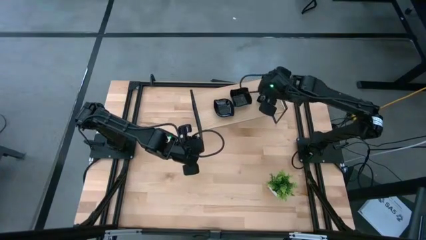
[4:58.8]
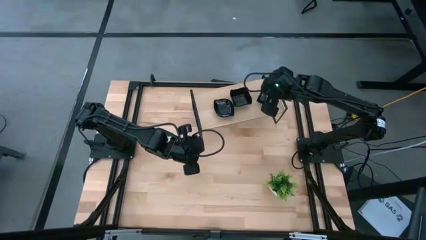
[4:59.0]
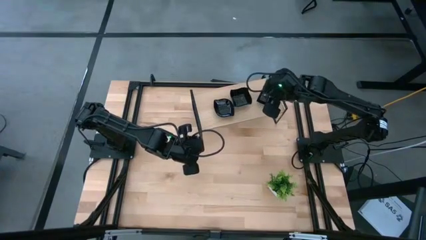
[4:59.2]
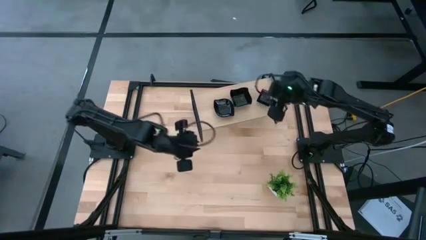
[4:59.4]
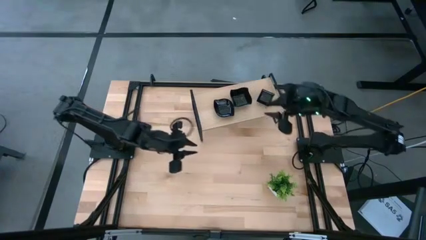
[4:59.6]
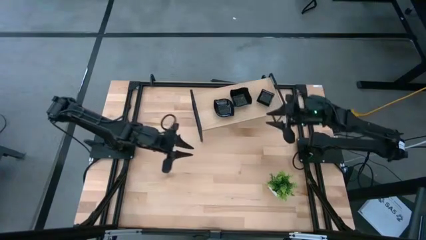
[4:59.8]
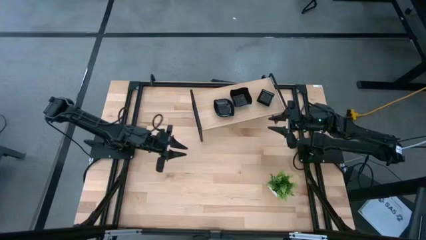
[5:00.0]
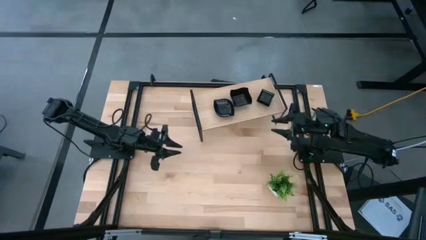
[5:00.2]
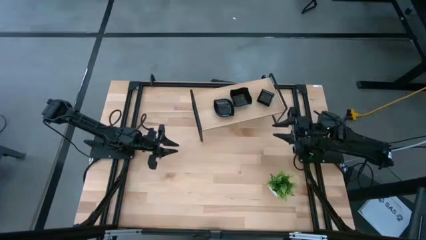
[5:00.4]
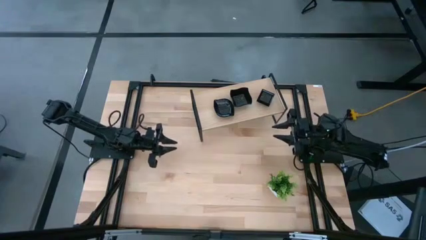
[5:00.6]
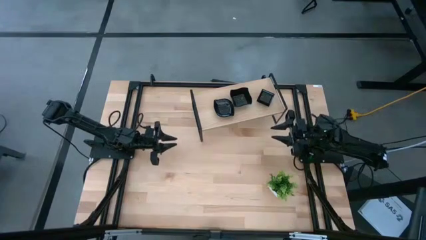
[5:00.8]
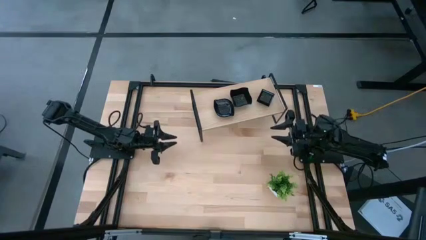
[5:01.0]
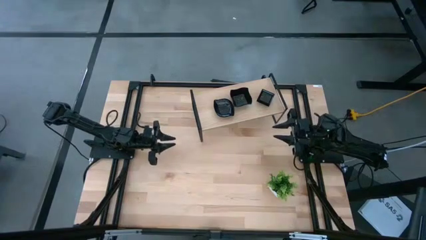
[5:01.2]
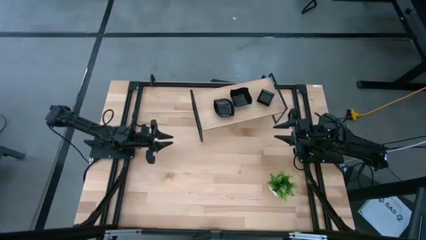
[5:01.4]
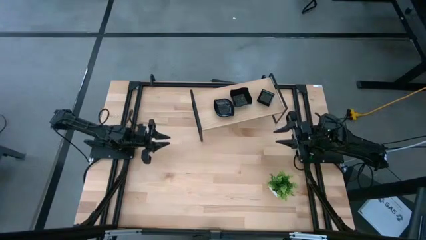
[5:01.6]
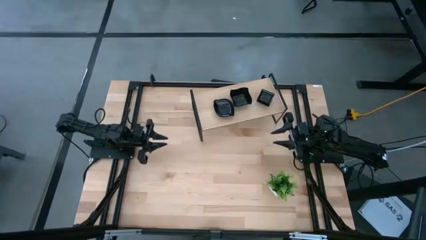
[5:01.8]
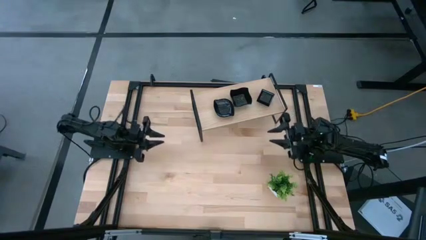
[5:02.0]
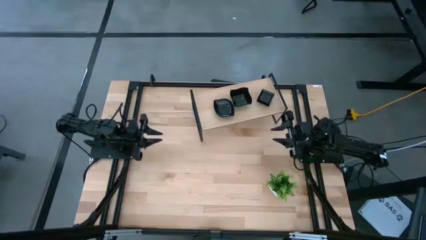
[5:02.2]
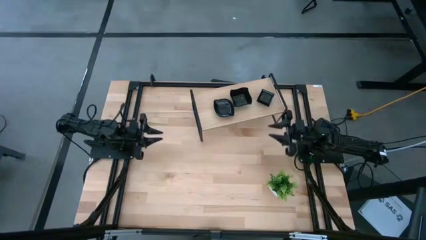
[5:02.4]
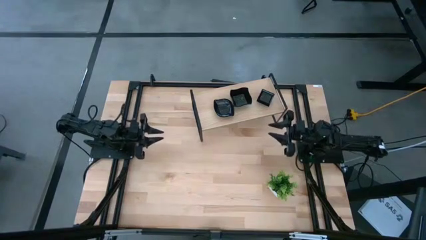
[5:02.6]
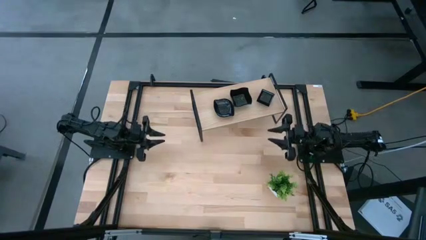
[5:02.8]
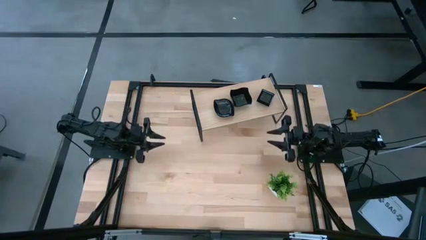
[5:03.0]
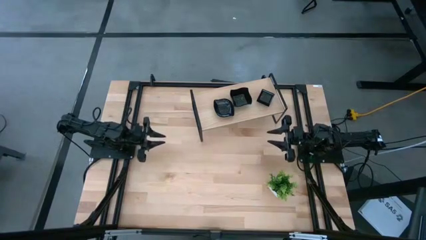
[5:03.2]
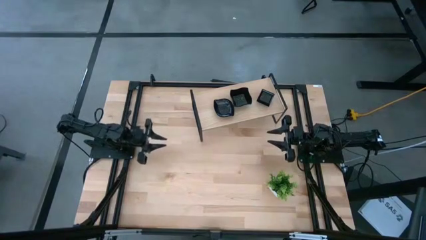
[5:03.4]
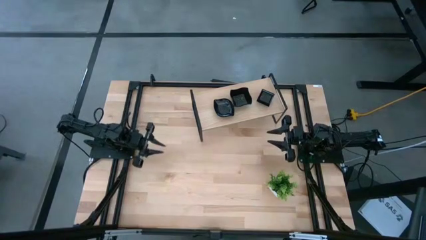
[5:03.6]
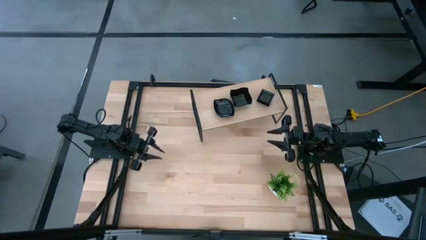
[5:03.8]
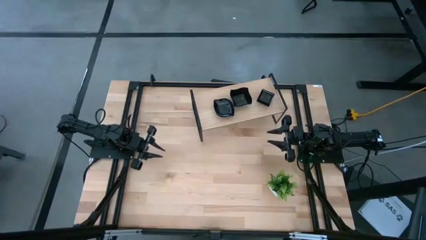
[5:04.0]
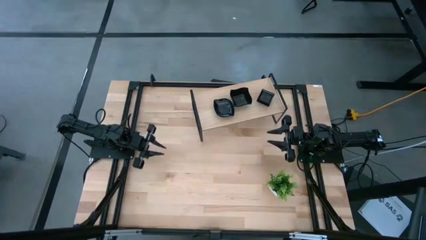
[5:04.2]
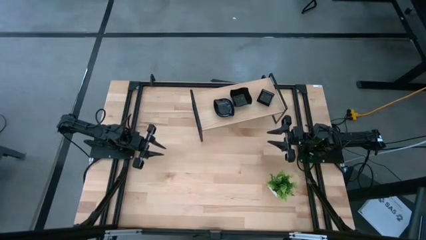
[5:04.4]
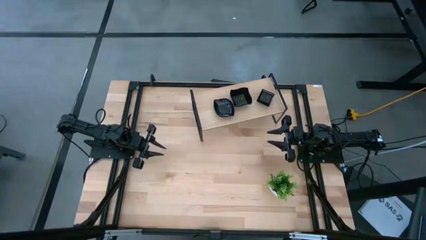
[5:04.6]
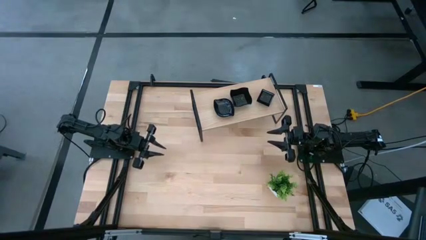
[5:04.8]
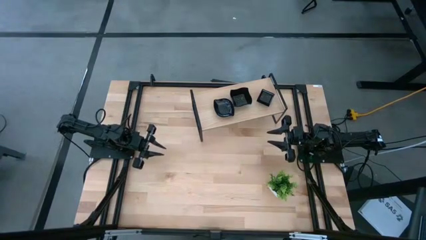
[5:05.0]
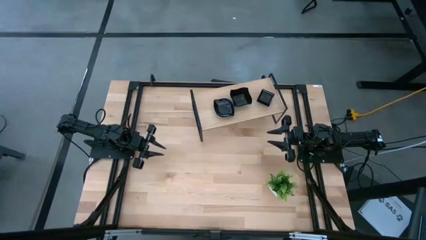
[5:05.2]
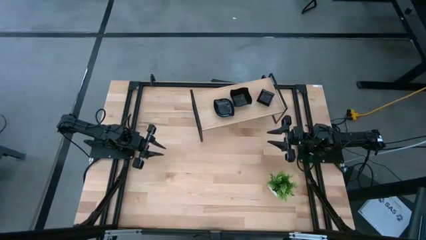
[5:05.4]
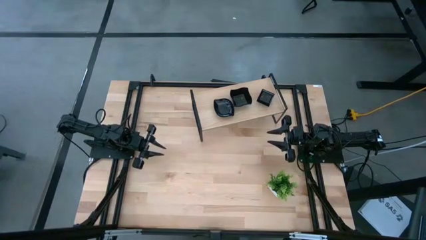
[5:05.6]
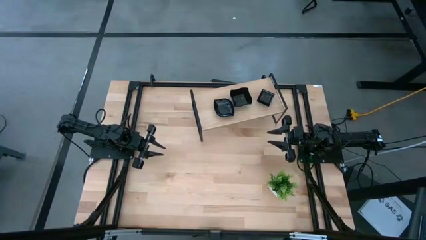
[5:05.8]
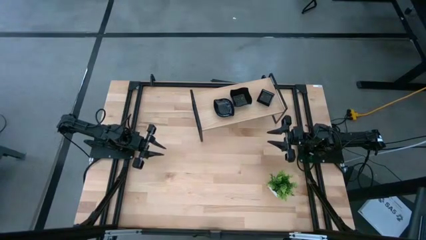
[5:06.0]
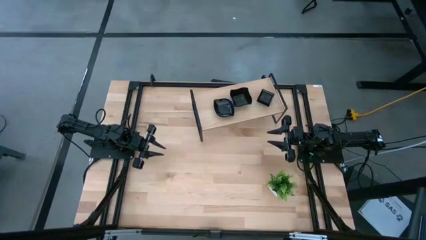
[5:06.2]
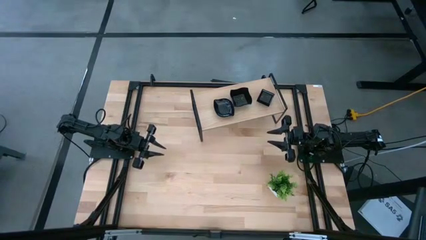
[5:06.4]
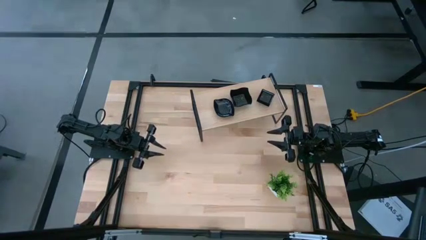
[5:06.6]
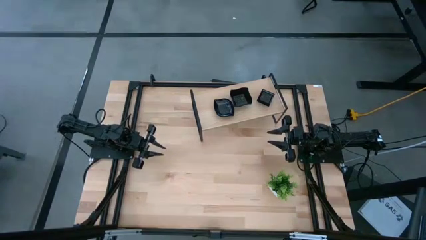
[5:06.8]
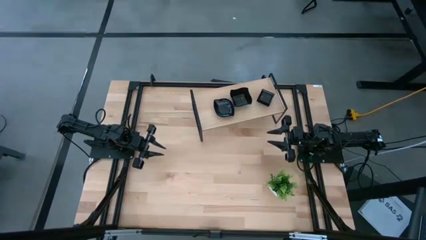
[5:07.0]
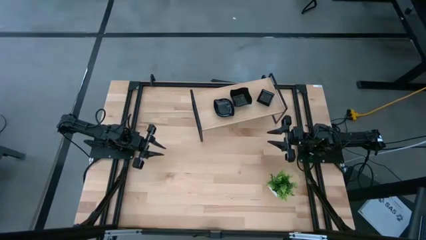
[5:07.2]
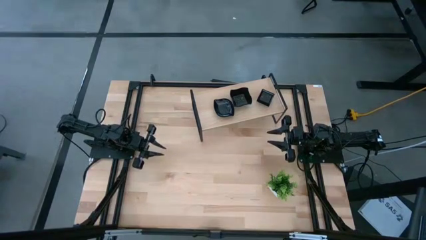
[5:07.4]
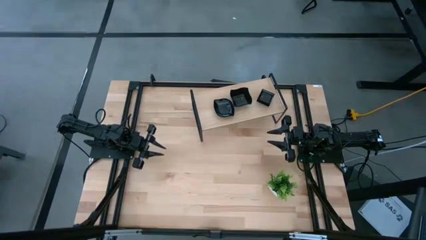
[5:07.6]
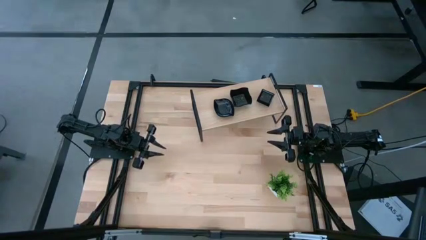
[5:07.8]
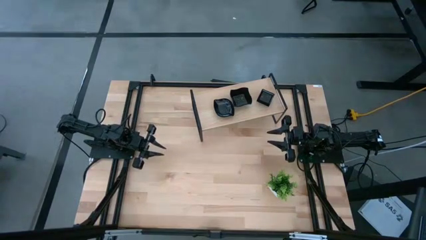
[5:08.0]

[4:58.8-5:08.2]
Task: Pick & Place Mini shaped plates
Return to Home Position

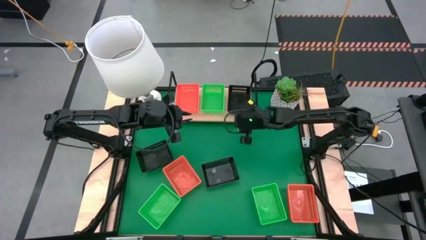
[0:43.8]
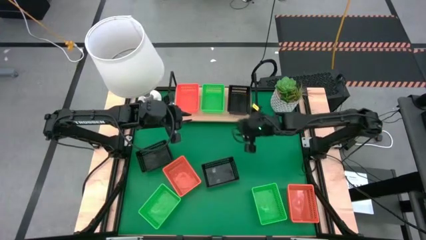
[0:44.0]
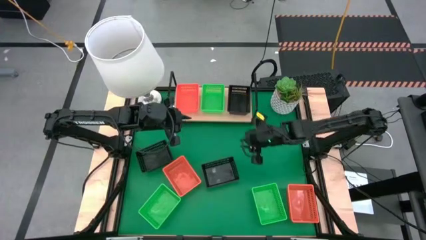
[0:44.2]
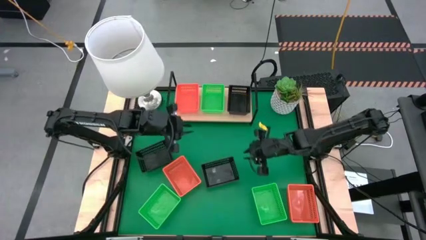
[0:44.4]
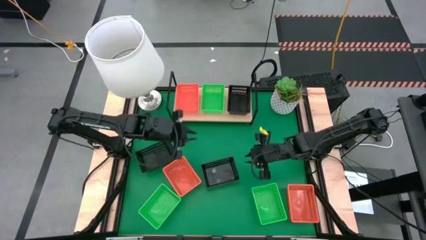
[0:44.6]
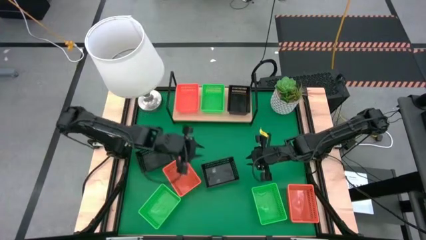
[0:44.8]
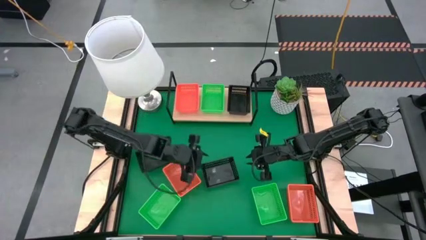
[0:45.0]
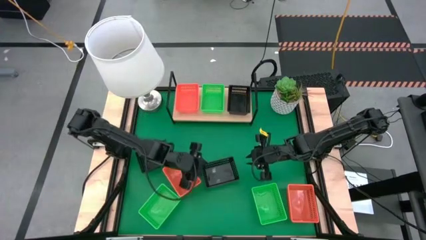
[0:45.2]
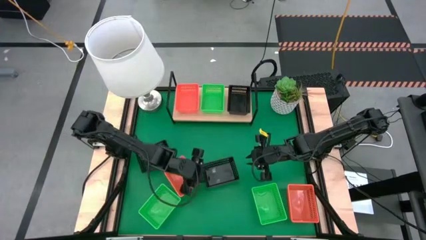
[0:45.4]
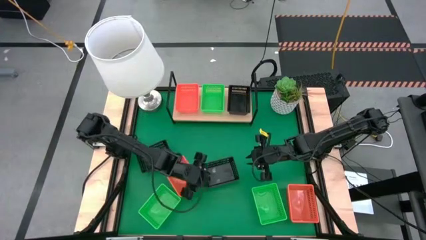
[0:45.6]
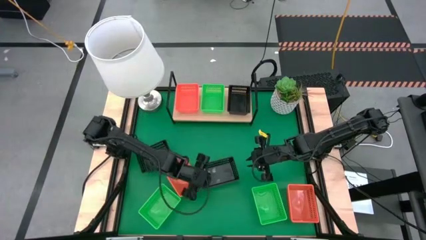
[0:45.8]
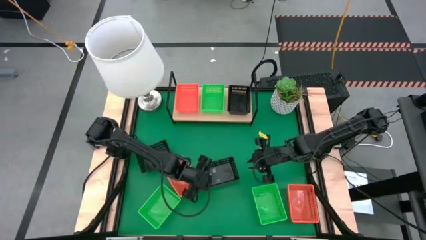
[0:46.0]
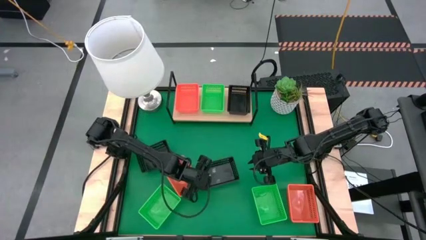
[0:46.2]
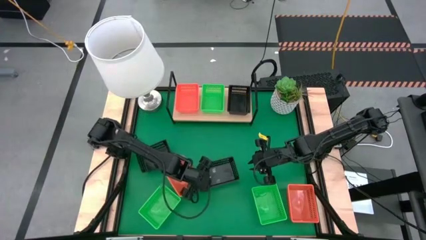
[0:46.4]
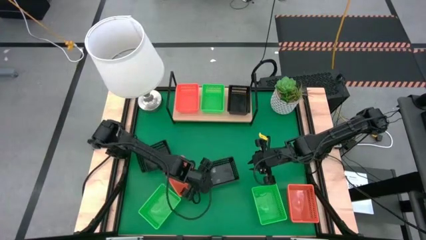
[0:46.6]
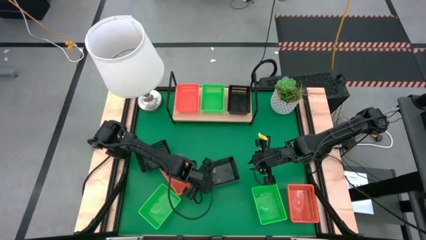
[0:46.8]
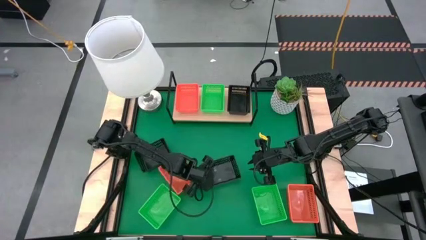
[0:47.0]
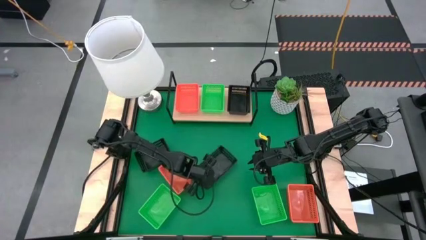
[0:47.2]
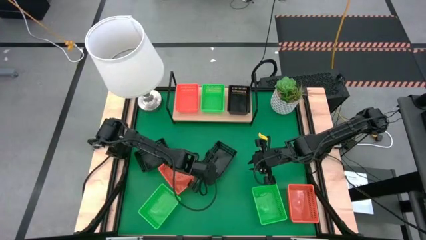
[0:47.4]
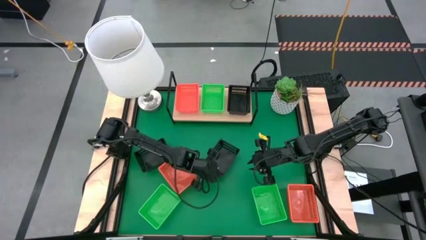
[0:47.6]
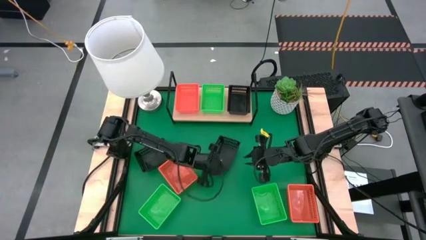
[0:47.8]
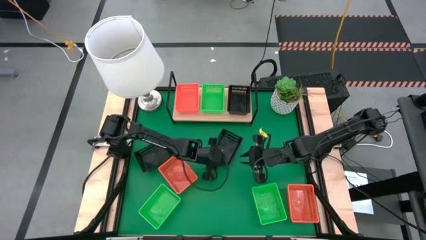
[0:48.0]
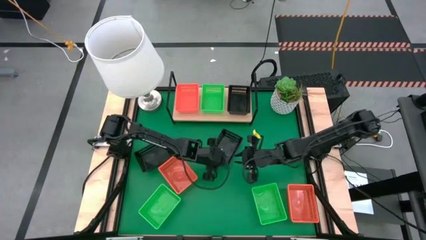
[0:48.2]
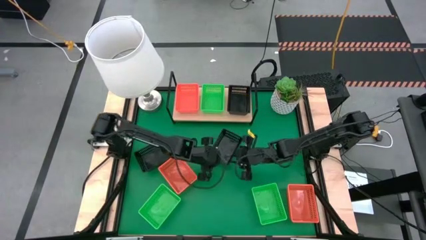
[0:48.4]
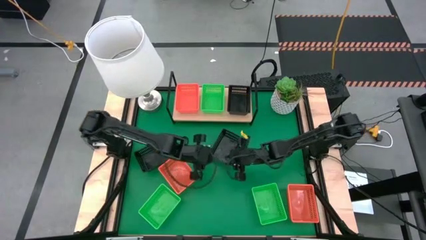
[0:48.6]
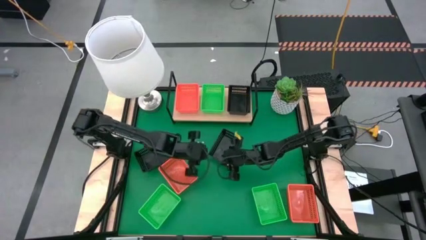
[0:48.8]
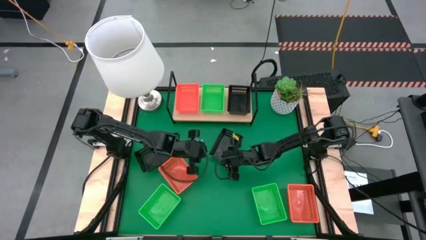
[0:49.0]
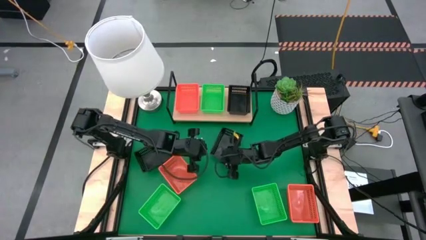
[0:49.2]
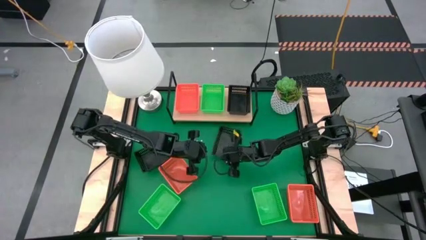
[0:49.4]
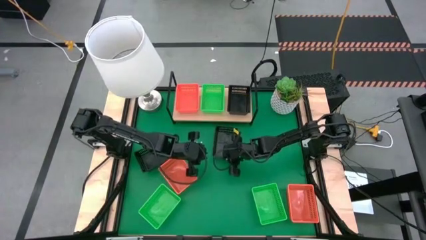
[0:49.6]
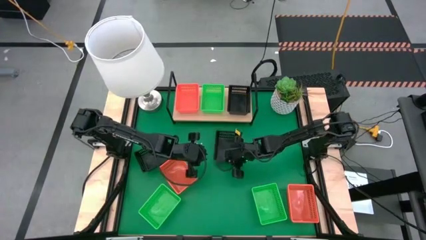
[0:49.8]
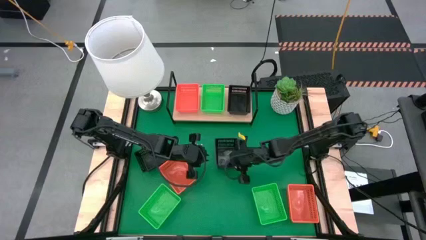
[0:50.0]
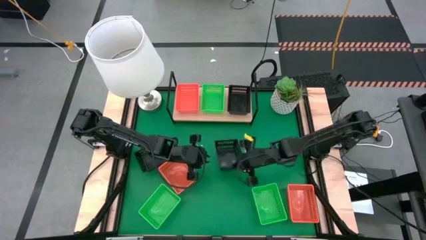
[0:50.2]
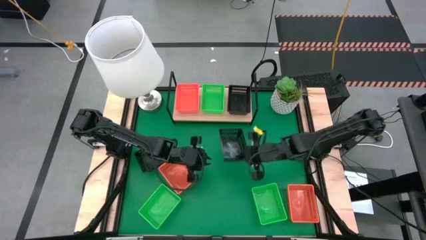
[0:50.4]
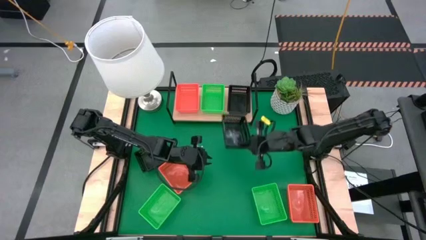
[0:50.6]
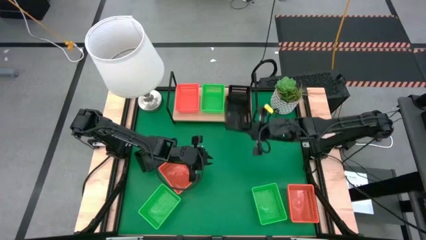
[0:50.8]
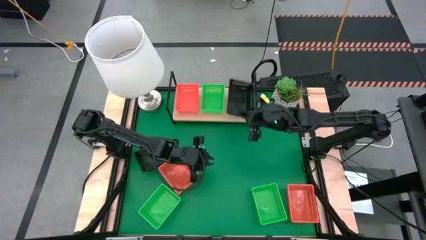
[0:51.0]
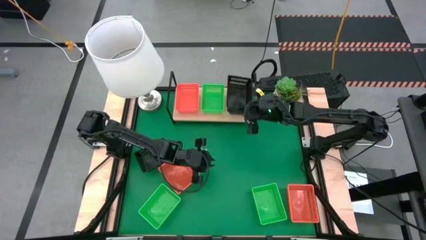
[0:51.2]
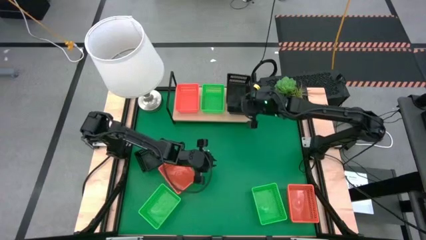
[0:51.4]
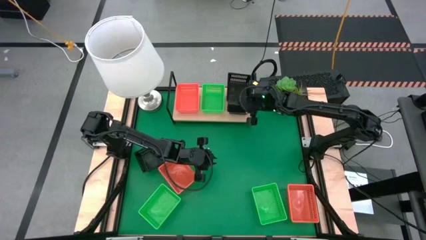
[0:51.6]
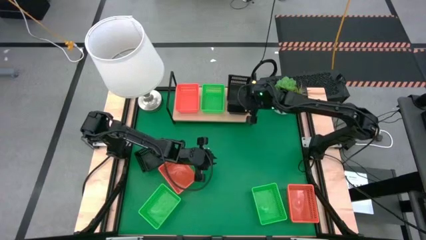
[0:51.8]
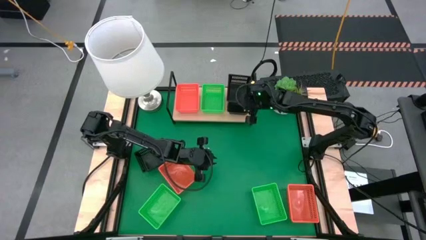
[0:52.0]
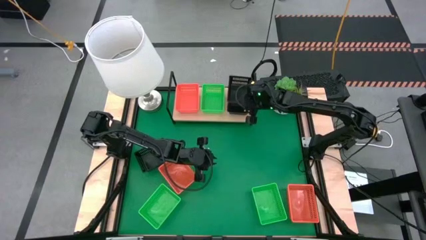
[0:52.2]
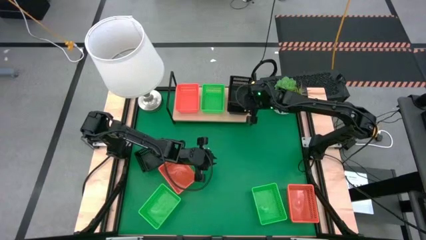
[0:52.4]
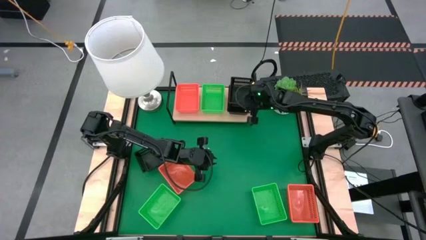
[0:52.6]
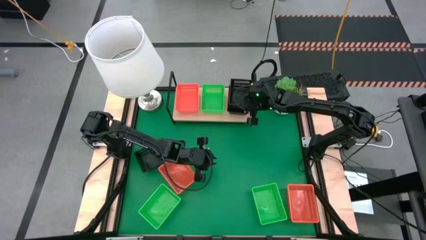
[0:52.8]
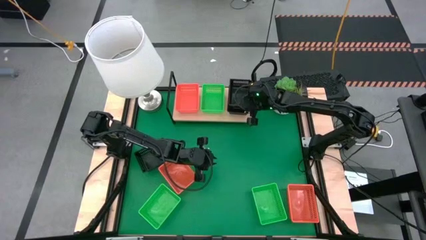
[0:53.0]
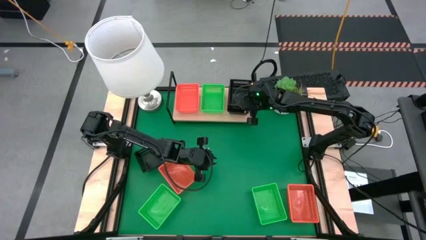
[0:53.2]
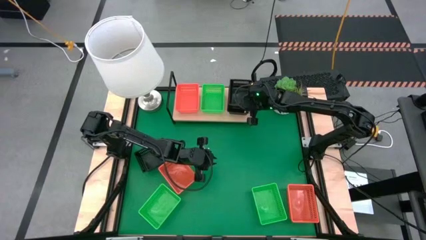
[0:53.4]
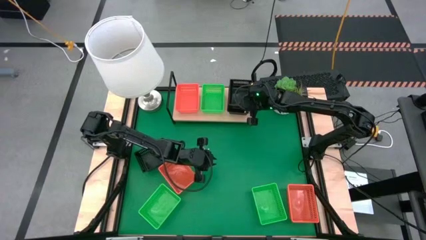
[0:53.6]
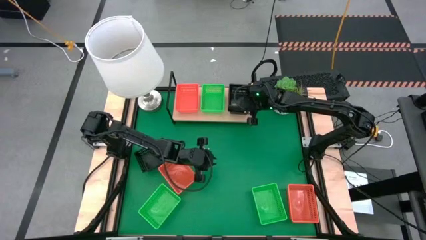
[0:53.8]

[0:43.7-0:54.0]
Task: Stack baskets on shelf by color
Stack the right black bin on the black bin on the shelf
